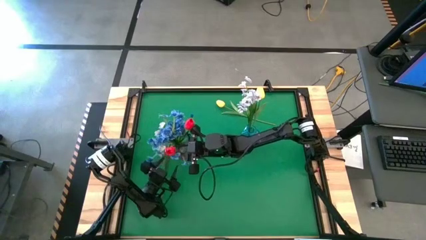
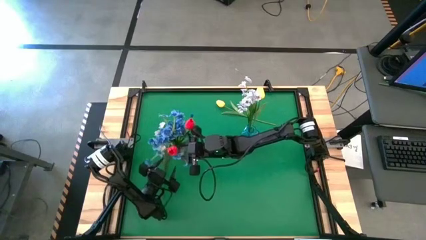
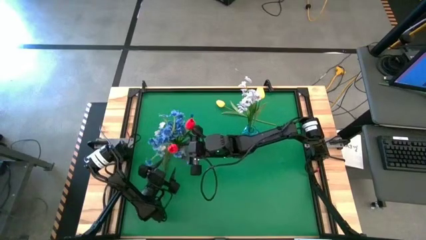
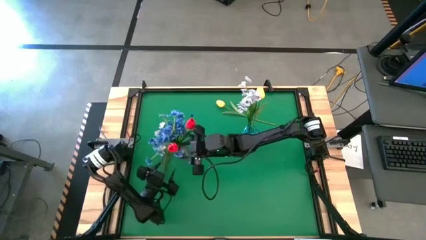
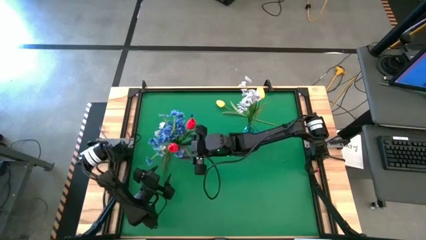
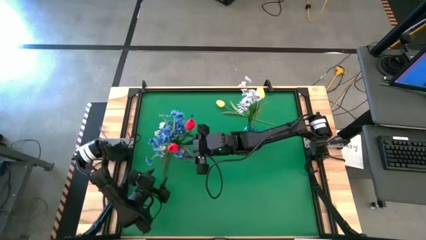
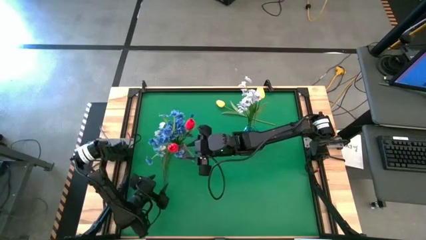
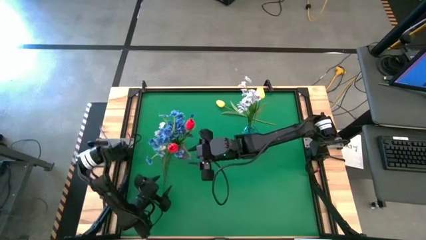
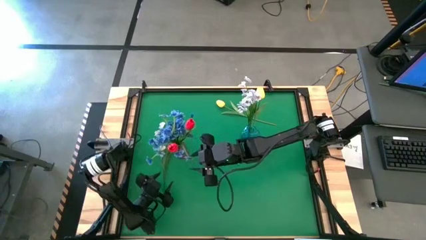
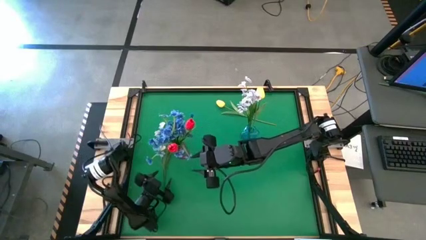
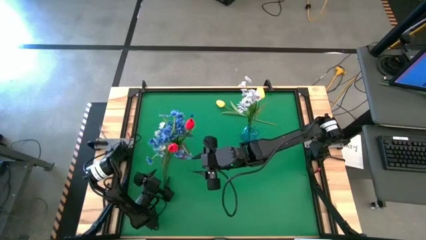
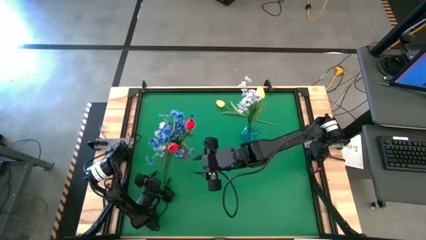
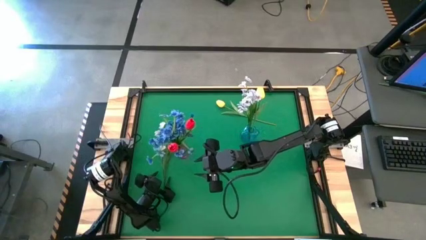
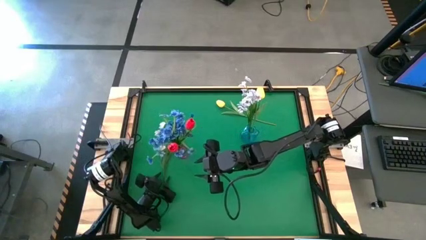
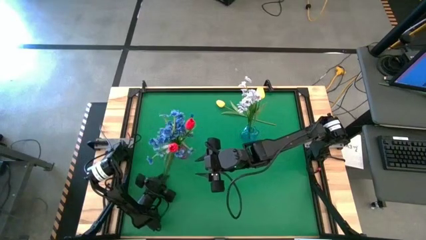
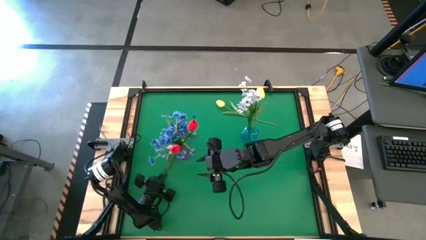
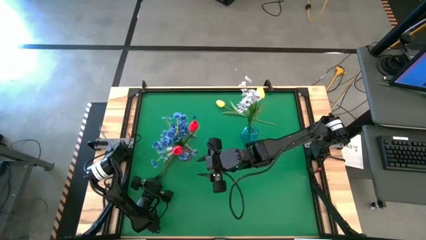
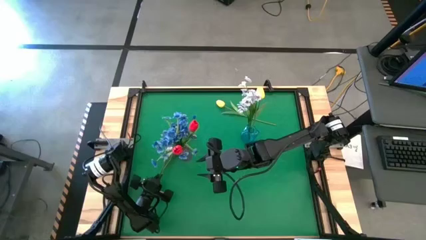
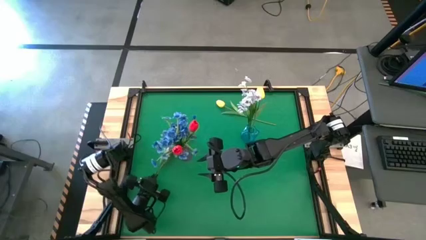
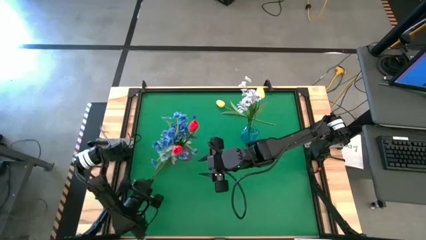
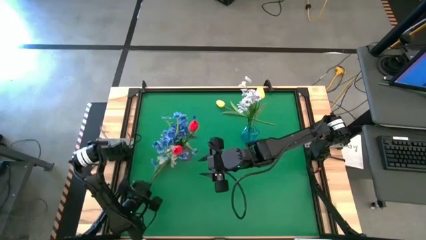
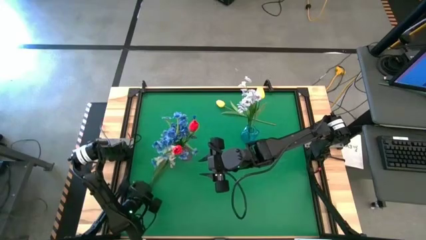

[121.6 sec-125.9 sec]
Task: Sort flowers into vase by color
Put the white flowers into the blue vase

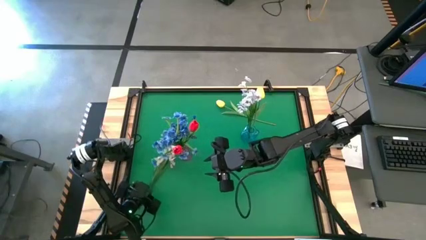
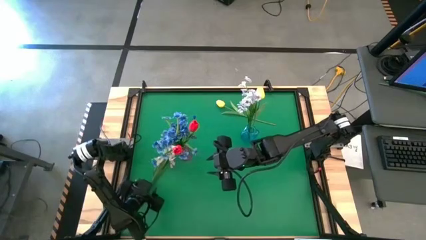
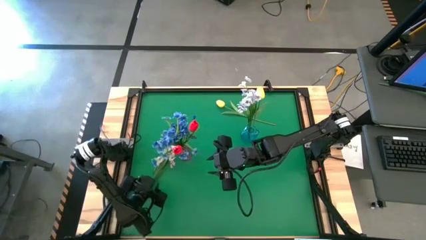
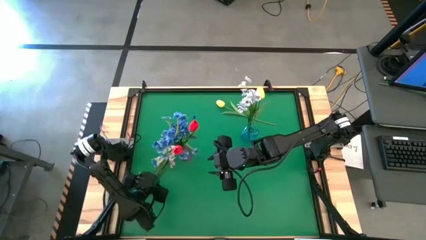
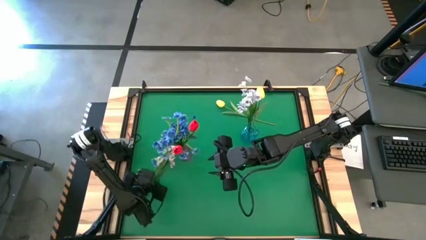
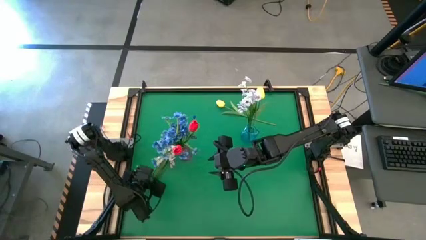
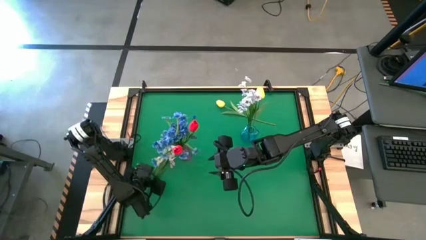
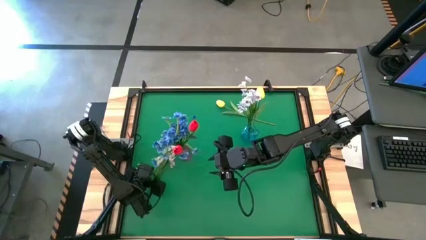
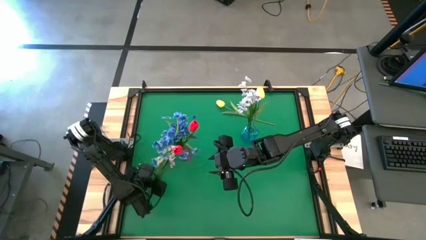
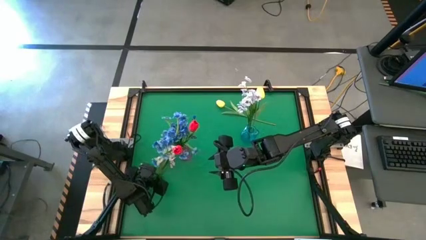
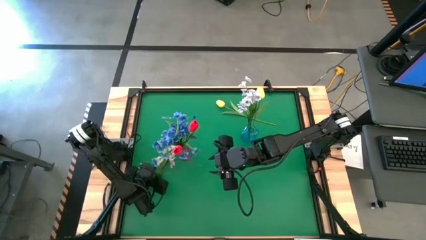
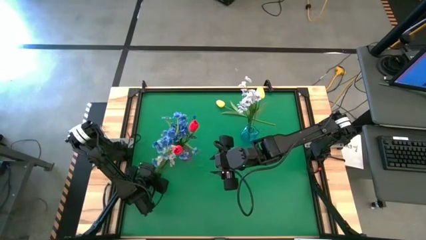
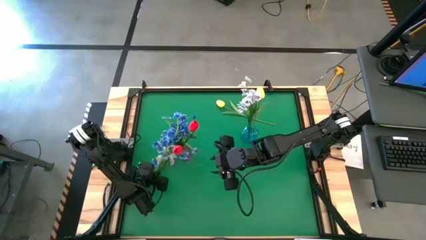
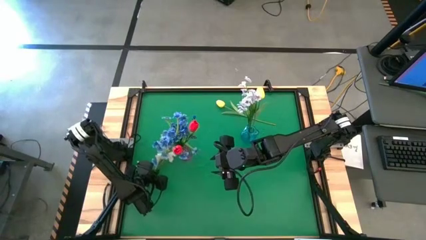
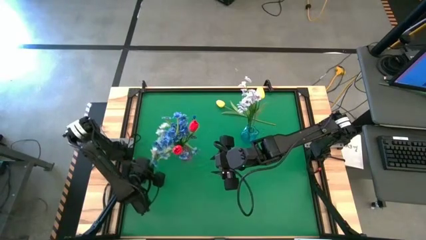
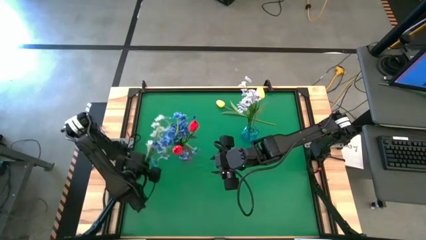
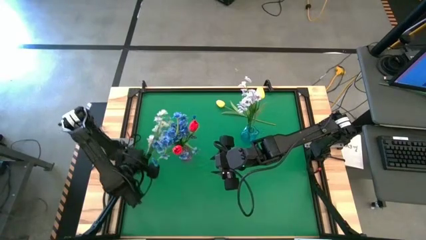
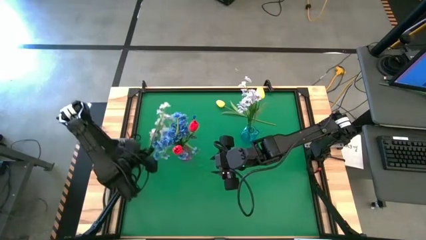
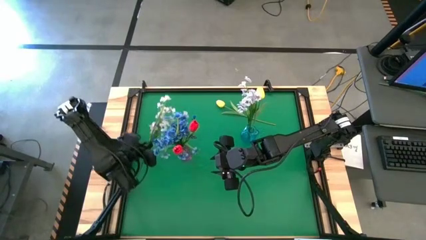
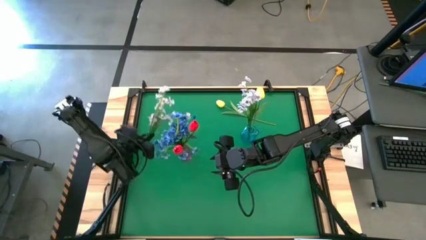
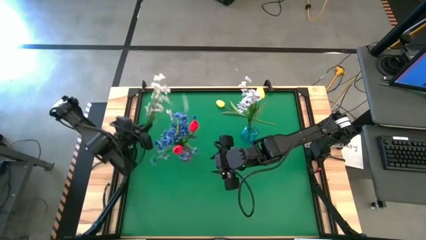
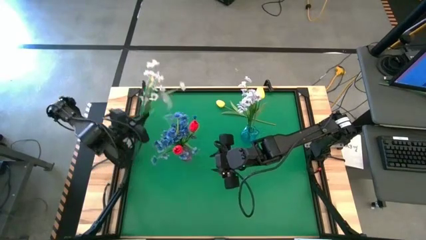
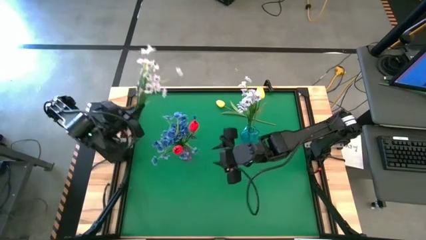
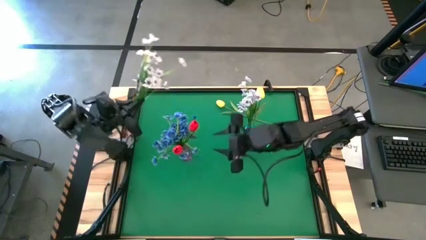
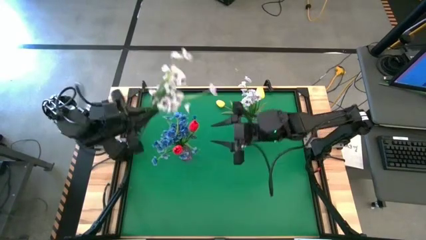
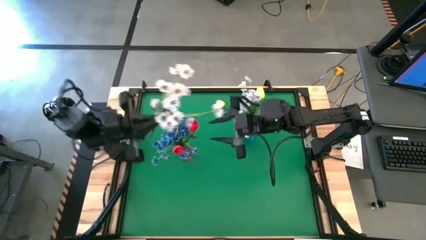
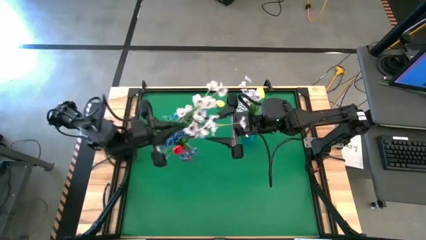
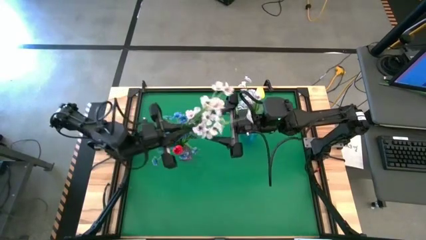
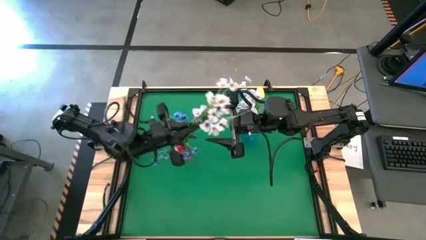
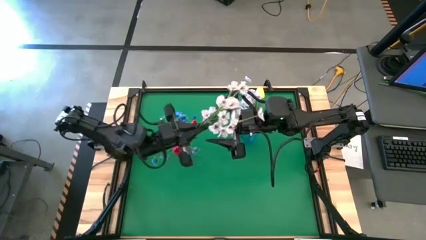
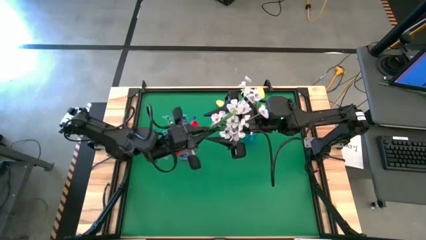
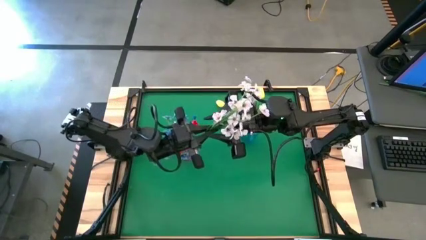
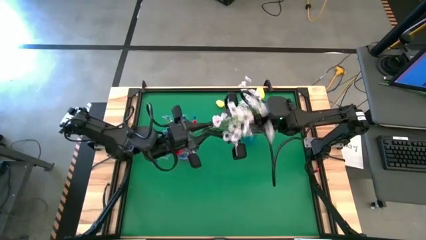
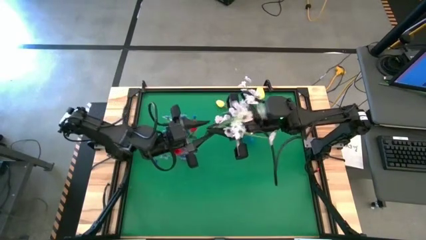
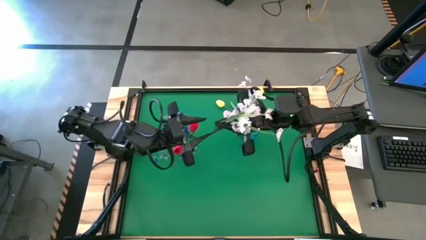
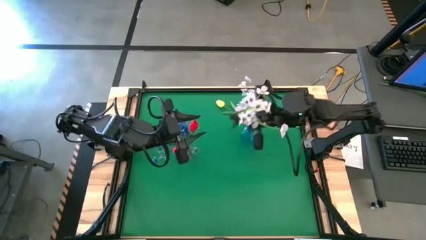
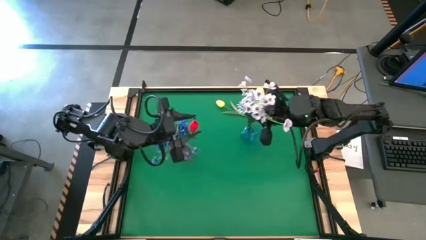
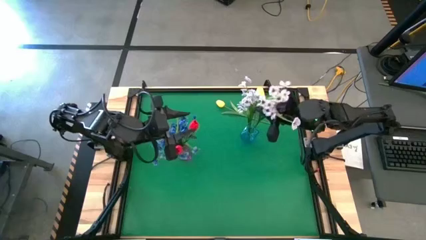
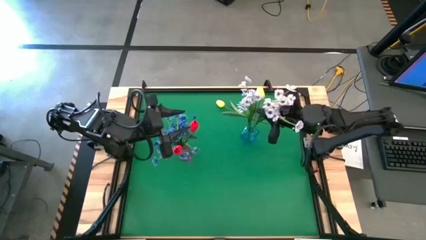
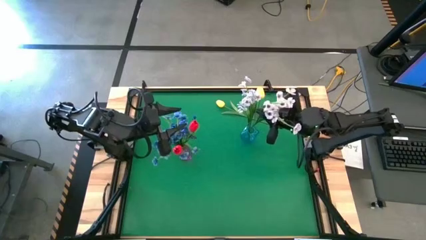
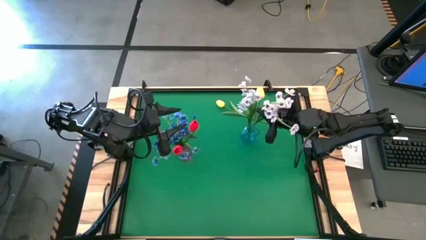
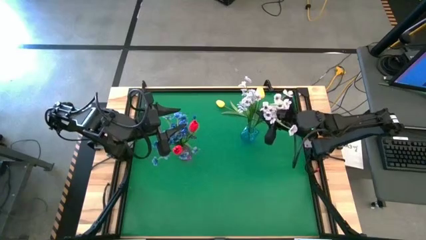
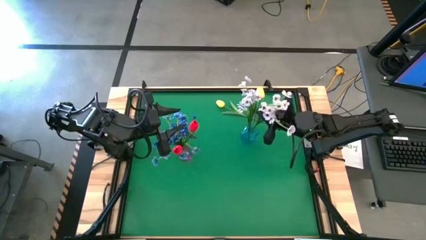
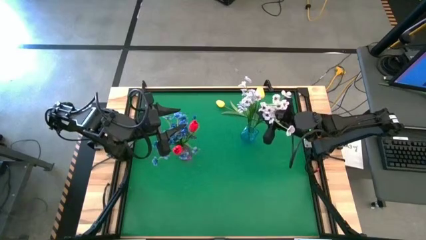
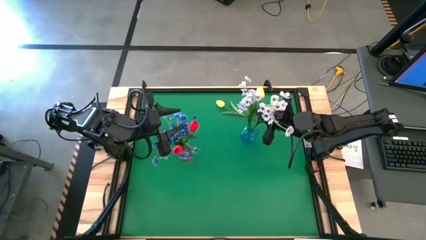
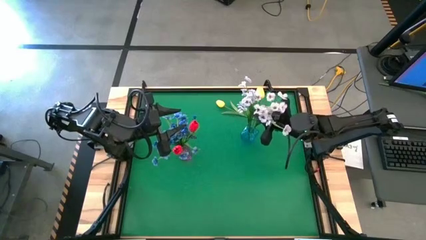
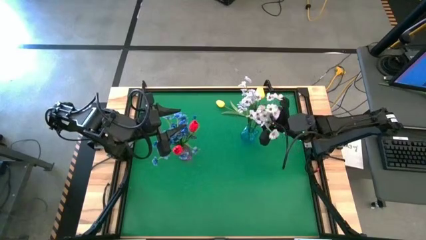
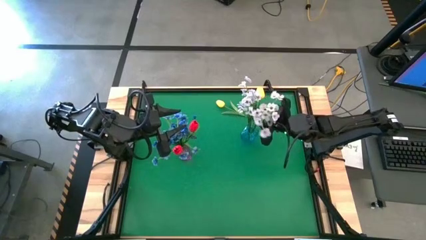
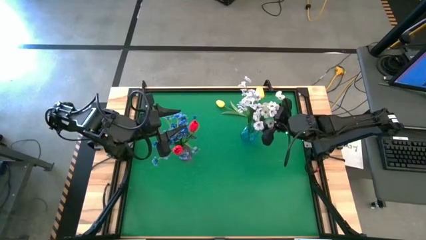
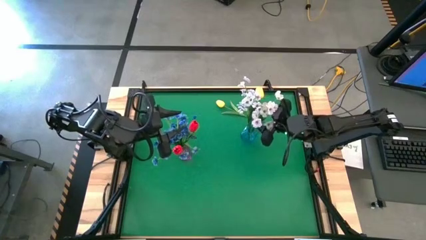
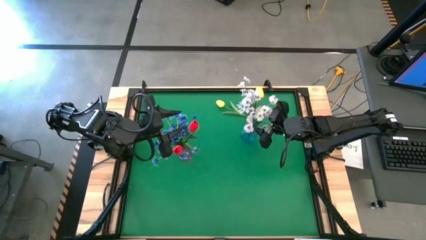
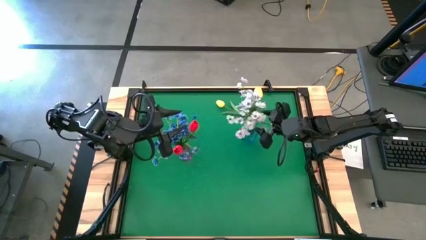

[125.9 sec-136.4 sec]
Put the white flowers into the blue vase
